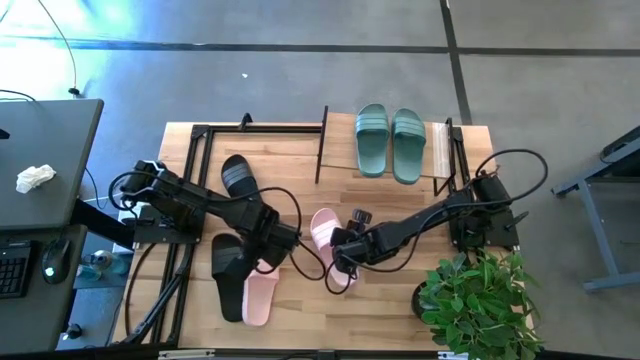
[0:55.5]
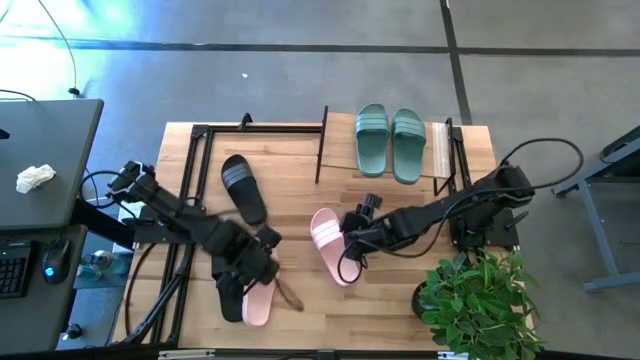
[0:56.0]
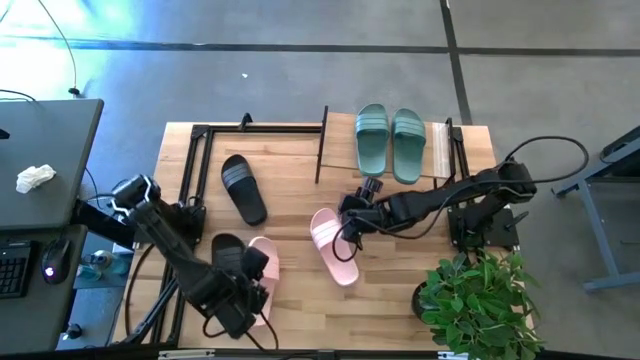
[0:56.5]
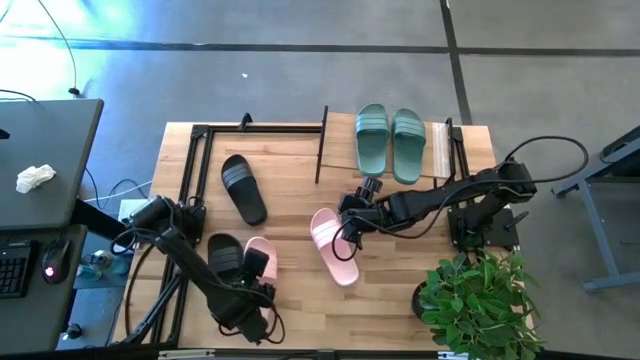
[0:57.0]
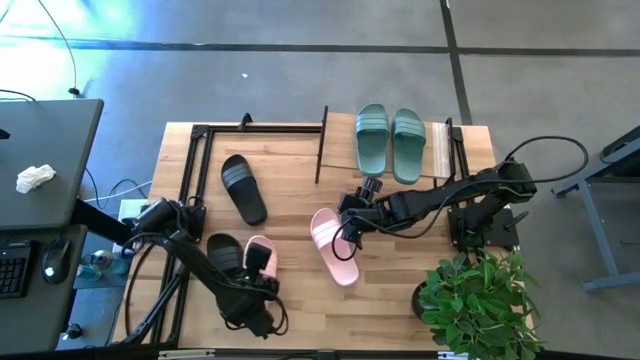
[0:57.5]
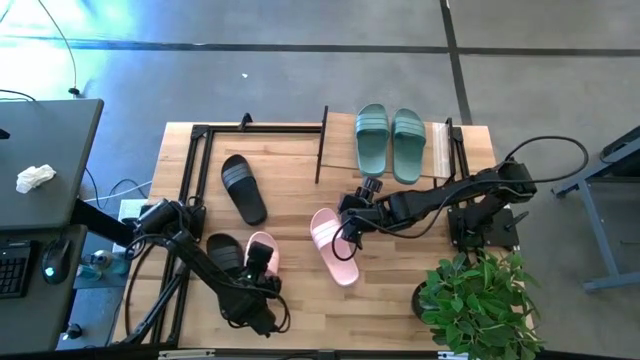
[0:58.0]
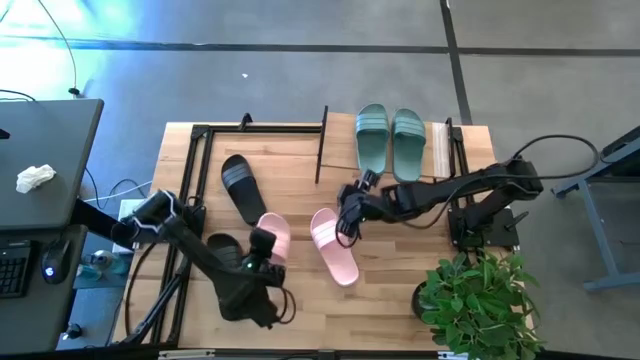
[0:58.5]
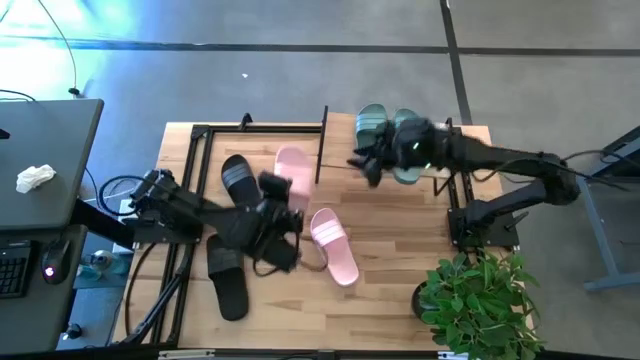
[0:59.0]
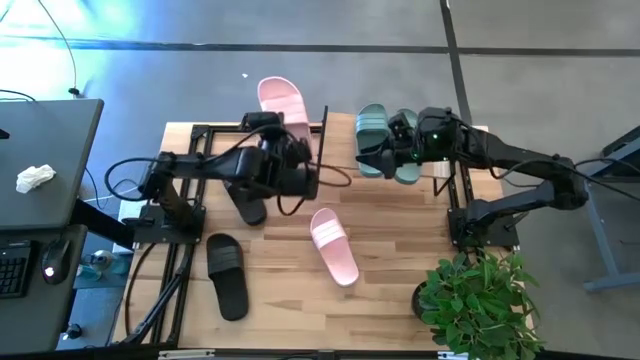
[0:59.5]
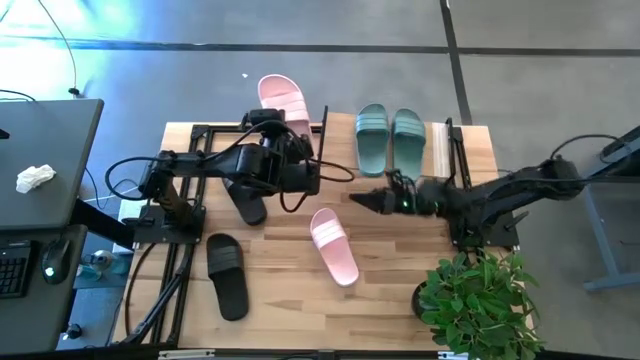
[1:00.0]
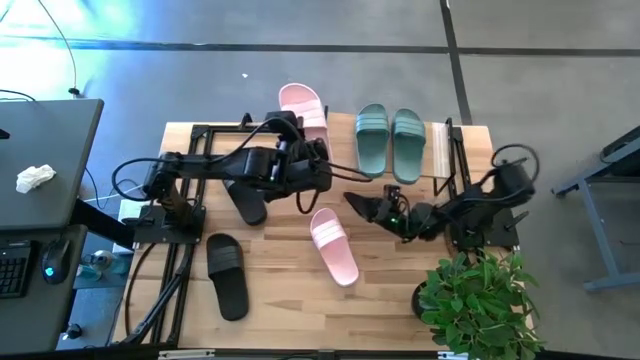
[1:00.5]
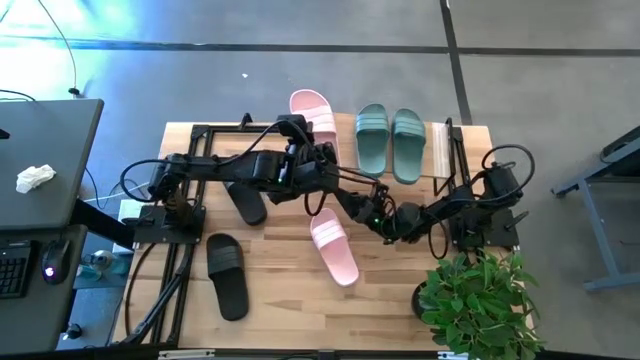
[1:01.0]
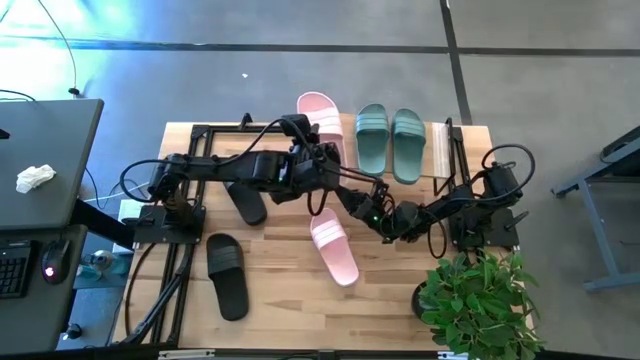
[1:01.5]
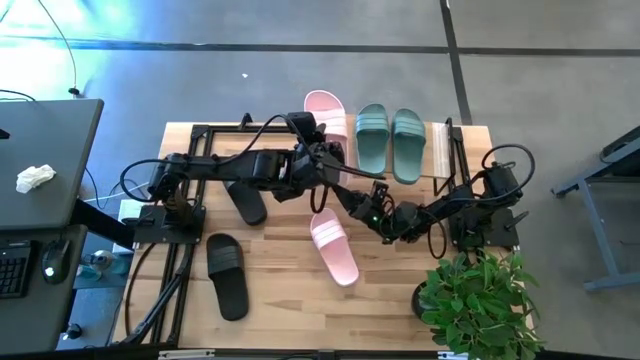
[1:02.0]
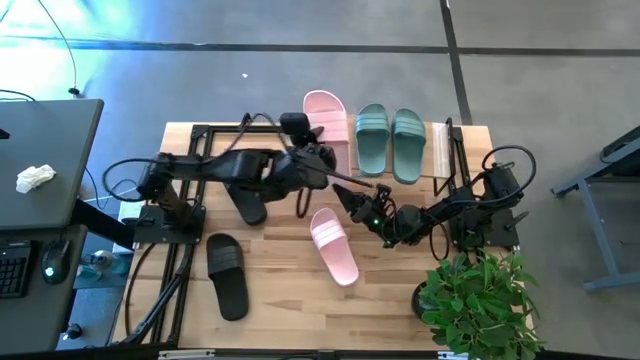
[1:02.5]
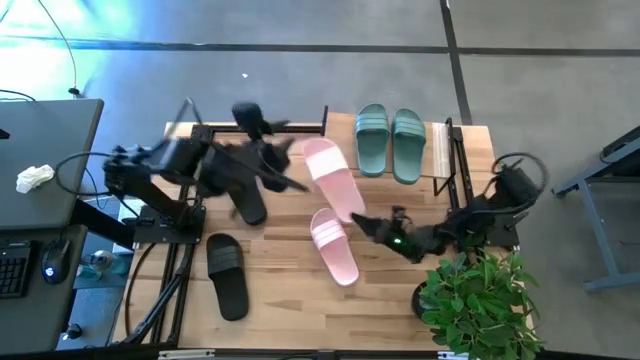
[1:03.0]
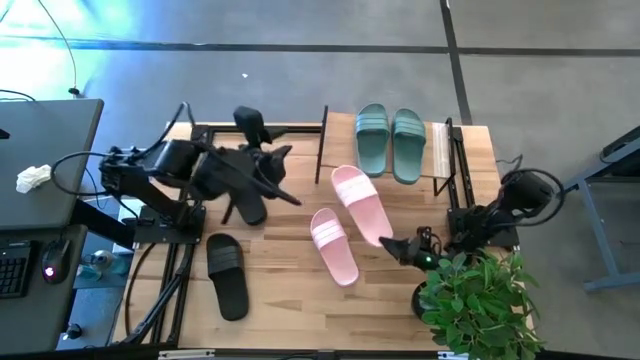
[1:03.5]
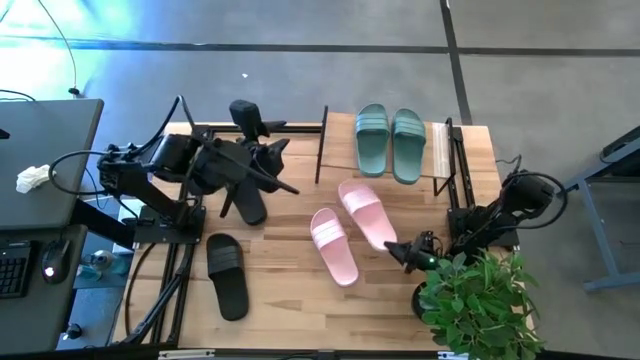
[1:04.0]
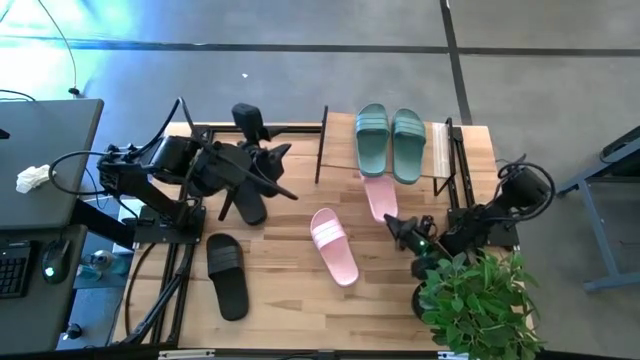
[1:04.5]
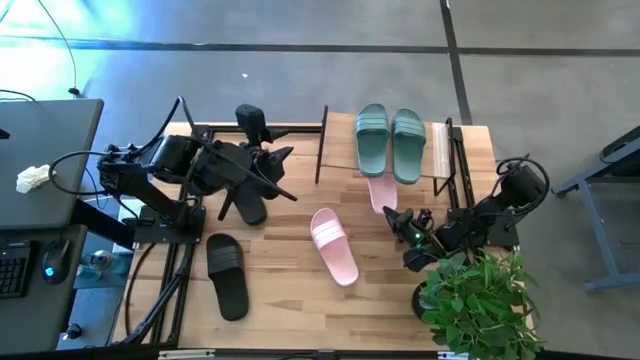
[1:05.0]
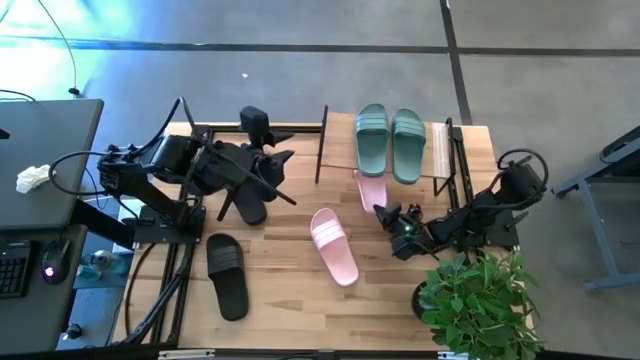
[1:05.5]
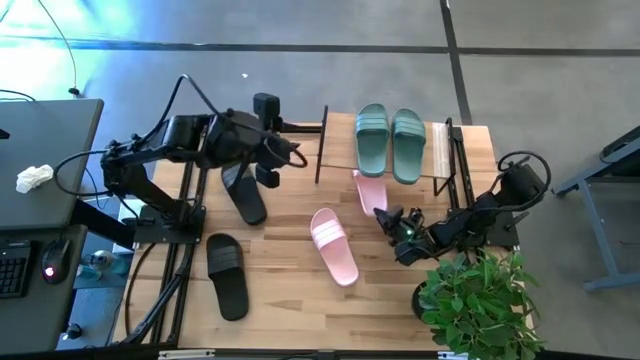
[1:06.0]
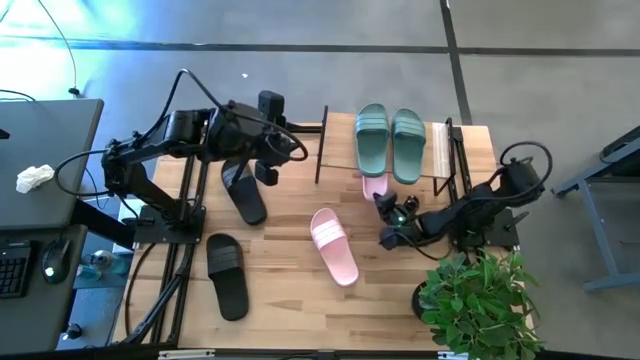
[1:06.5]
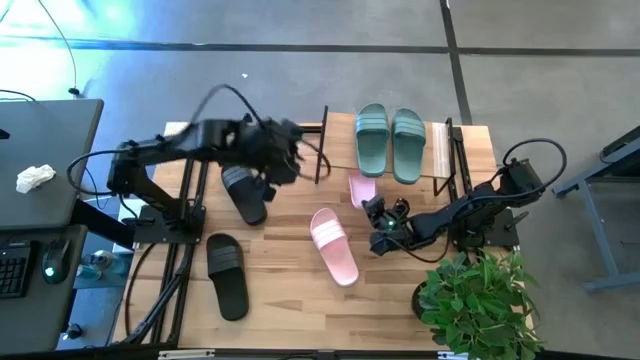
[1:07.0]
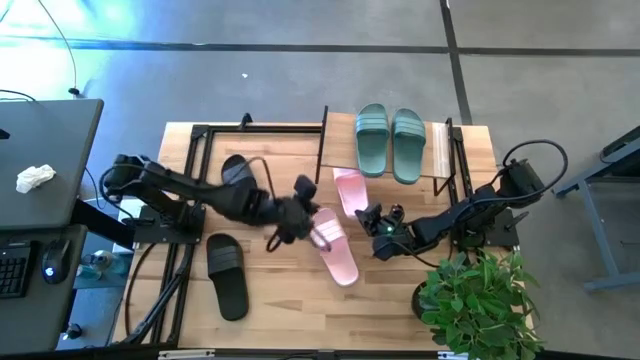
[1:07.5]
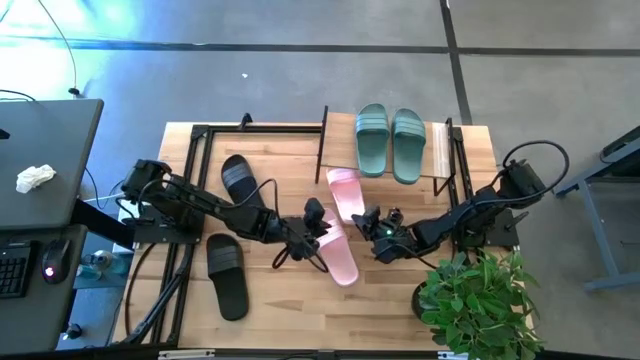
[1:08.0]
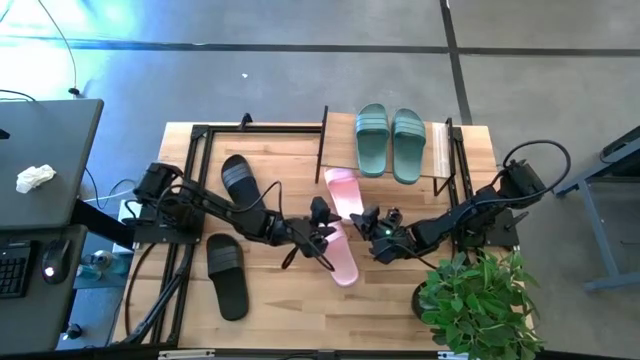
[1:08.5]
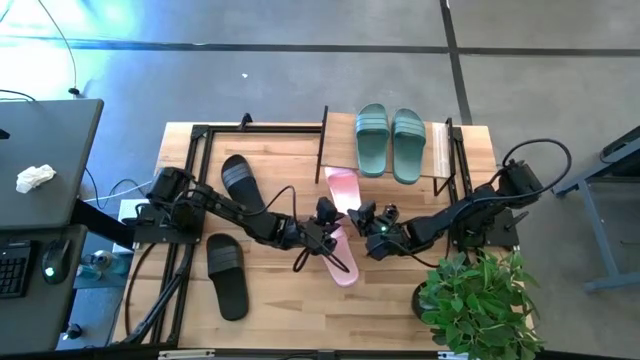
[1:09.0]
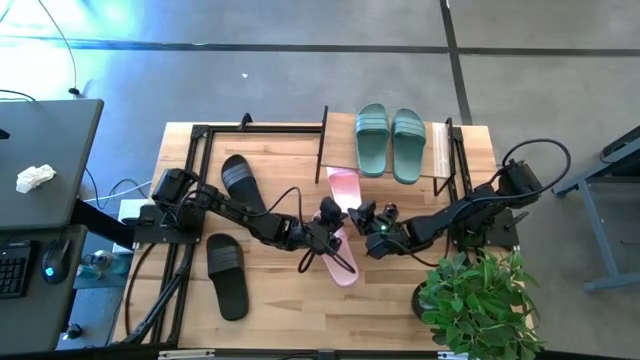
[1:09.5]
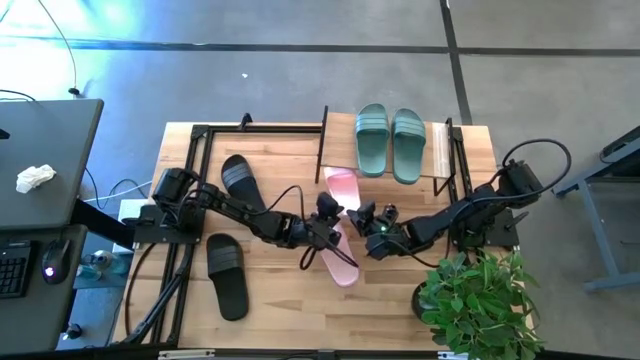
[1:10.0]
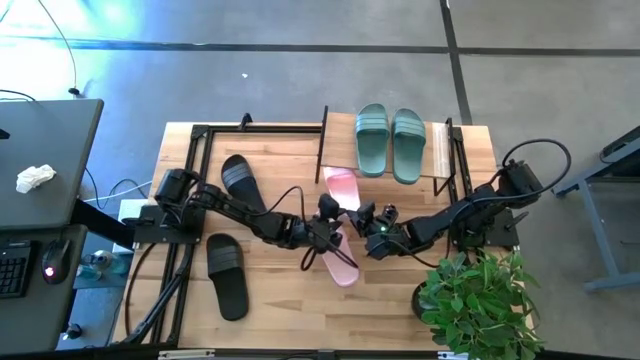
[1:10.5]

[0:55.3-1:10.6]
Task: Pick and place slides into the shelf
Put the left pink slides under the shelf

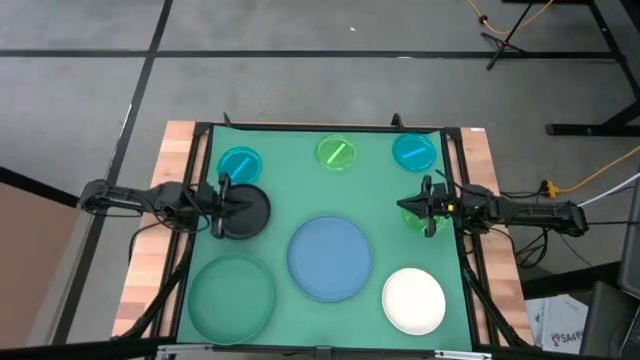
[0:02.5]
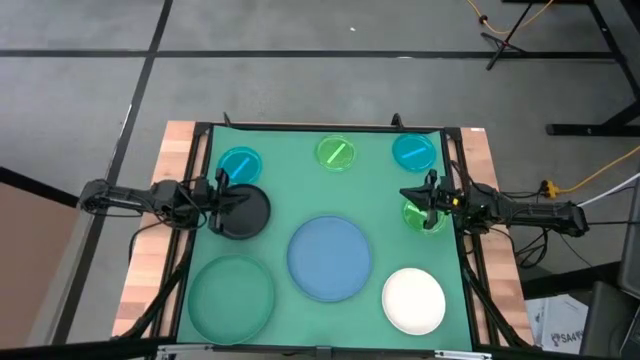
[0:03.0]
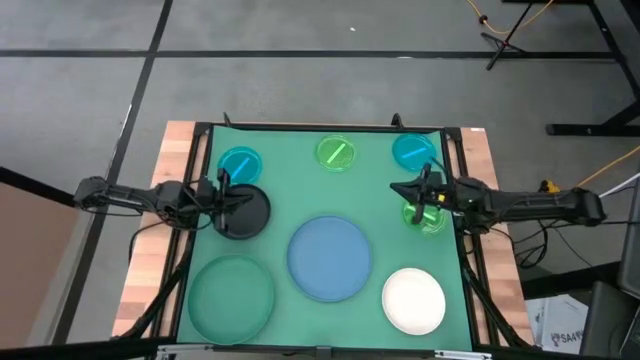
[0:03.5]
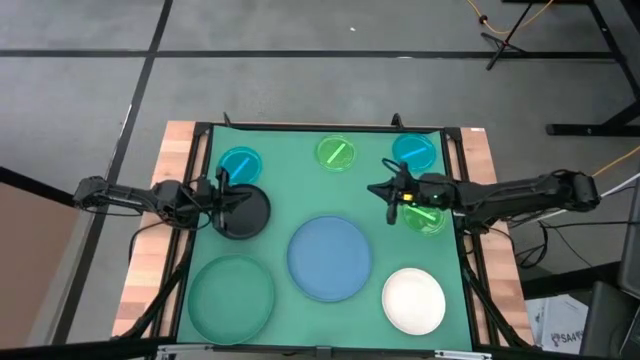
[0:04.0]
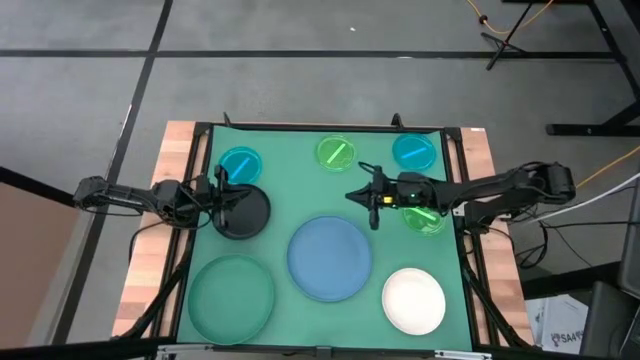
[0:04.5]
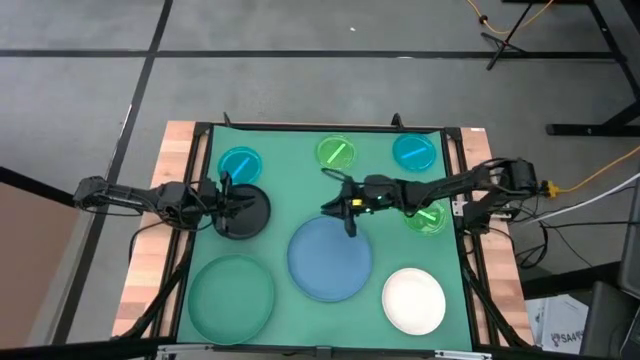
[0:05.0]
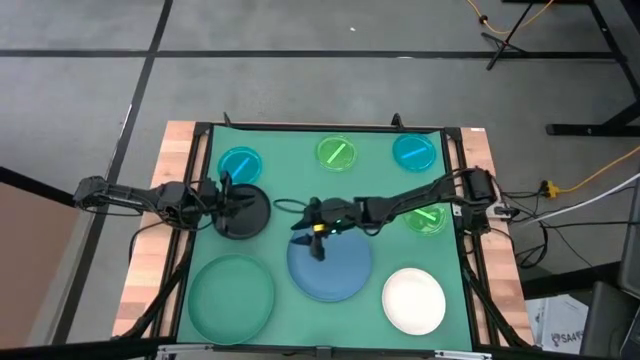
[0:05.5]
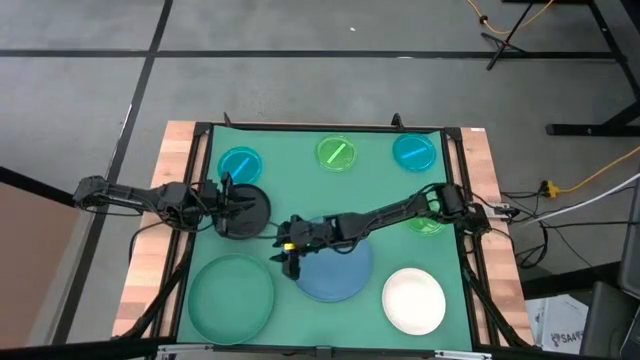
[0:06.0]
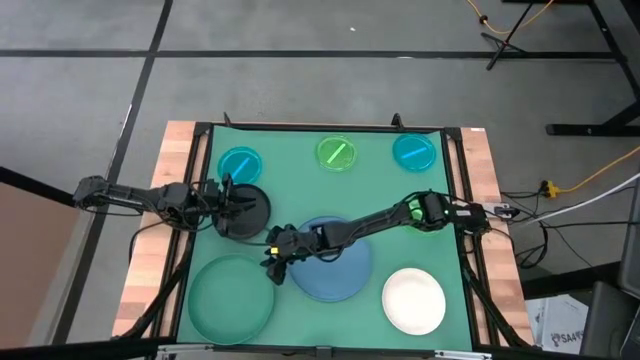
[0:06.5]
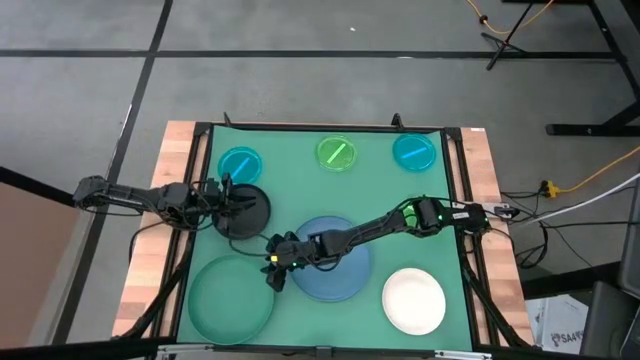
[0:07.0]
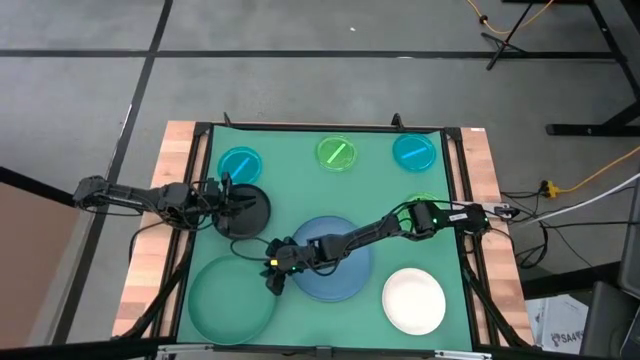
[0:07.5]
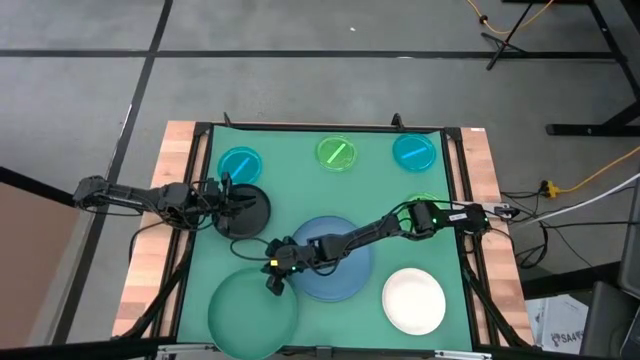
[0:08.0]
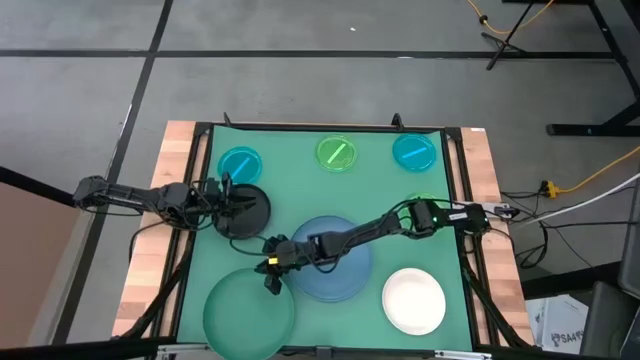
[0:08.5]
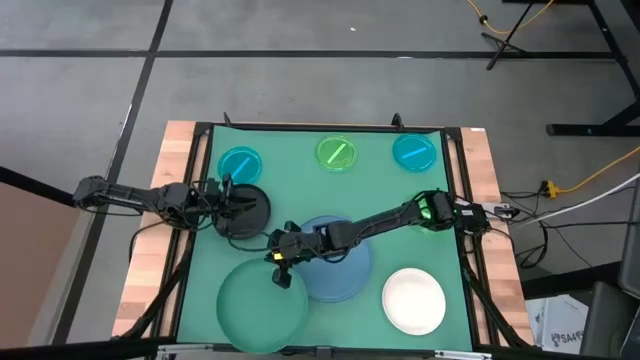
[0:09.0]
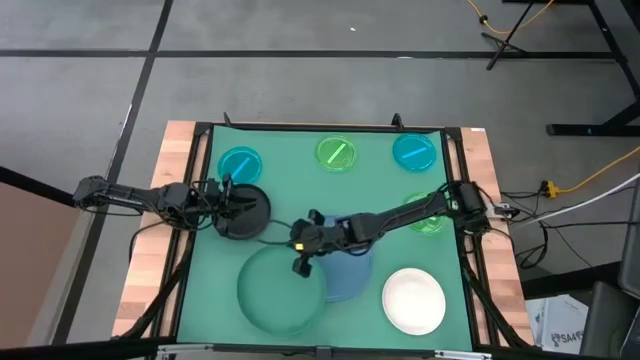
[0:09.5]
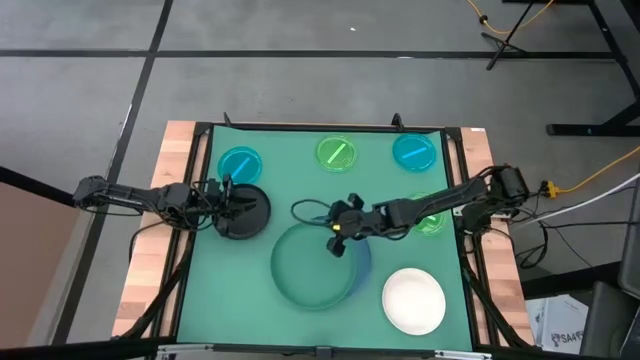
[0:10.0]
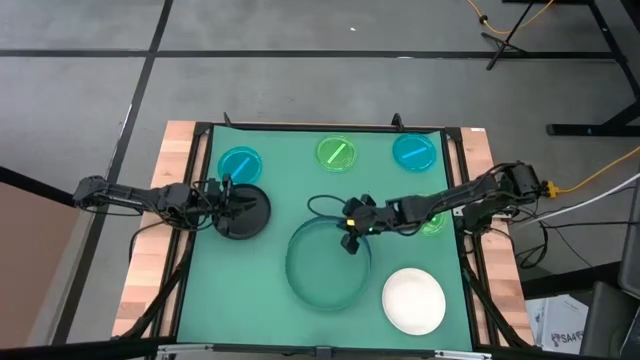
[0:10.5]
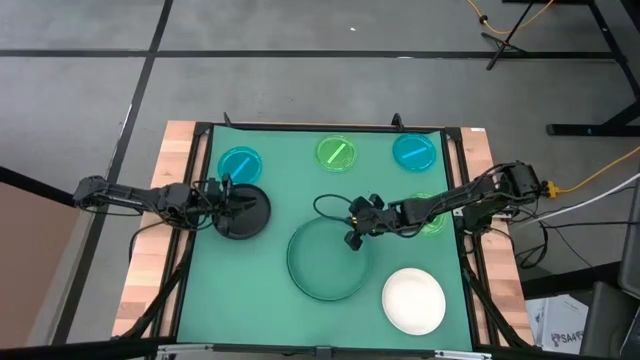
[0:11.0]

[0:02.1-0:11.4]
Task: Stack plastic plates
Stack the dark green plate on the dark blue plate
